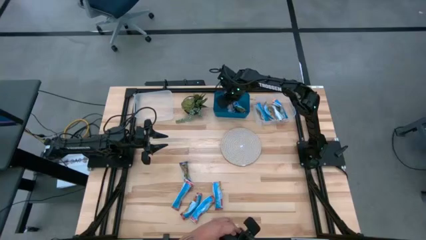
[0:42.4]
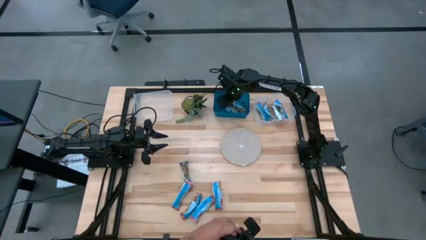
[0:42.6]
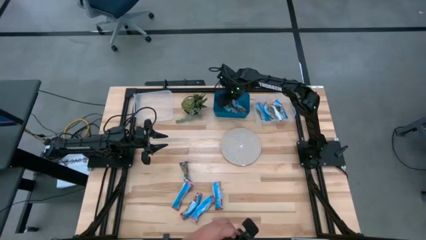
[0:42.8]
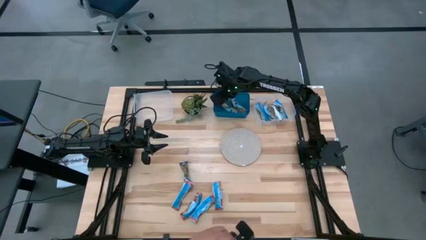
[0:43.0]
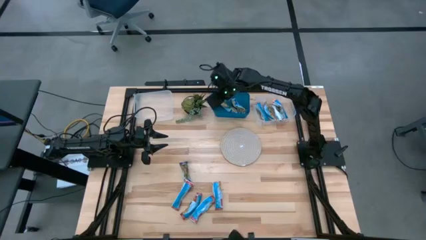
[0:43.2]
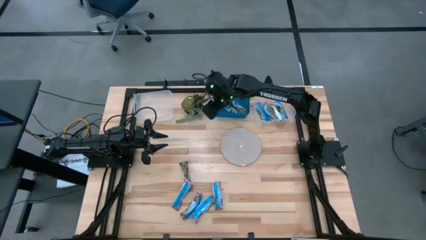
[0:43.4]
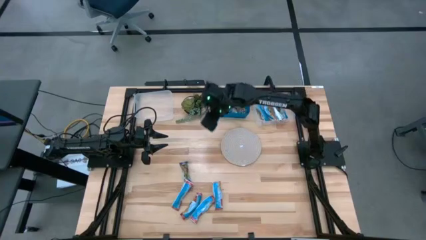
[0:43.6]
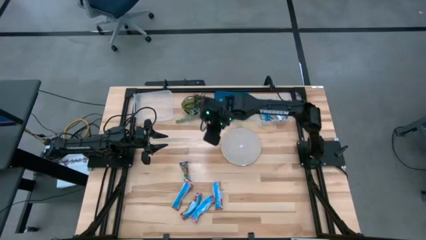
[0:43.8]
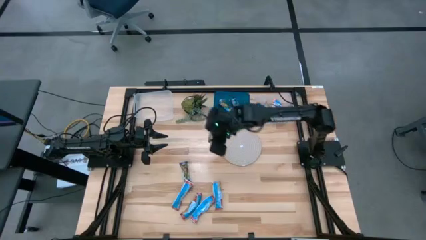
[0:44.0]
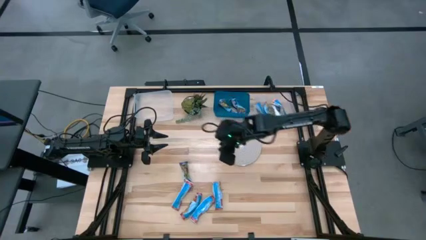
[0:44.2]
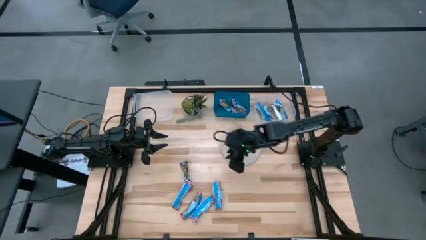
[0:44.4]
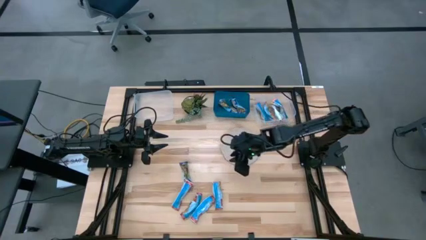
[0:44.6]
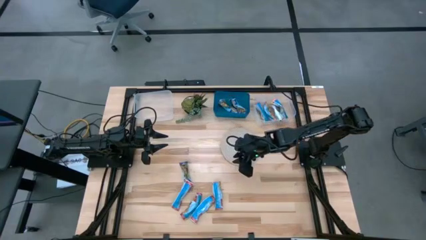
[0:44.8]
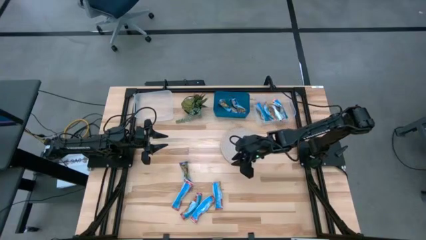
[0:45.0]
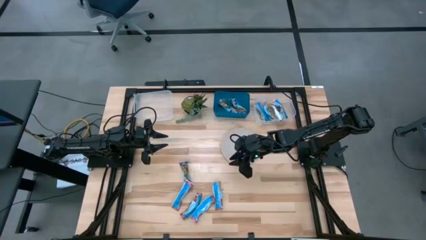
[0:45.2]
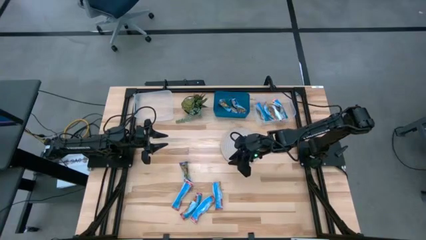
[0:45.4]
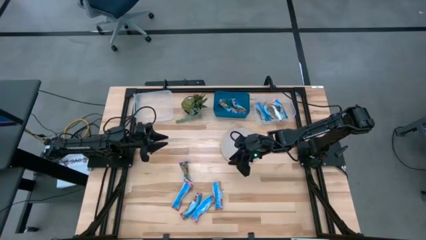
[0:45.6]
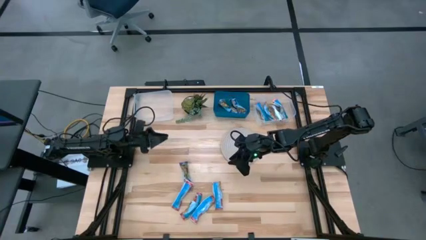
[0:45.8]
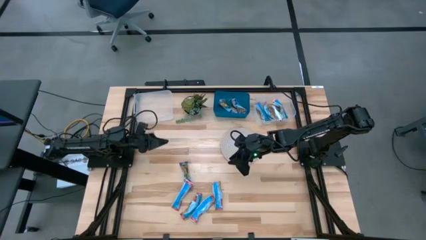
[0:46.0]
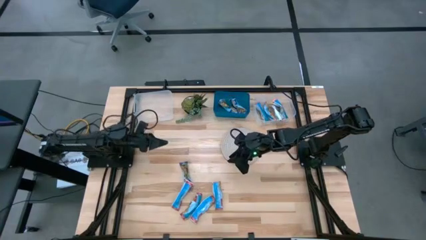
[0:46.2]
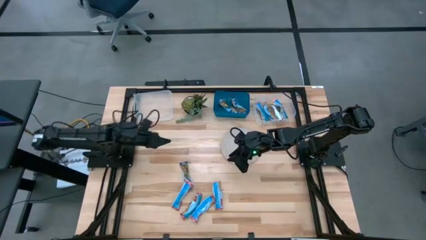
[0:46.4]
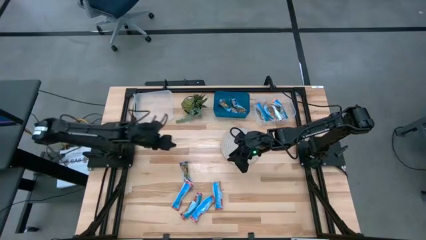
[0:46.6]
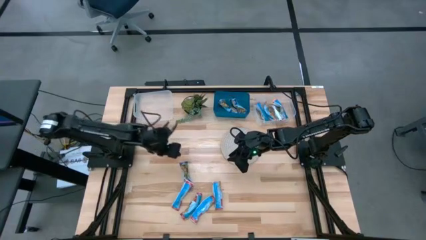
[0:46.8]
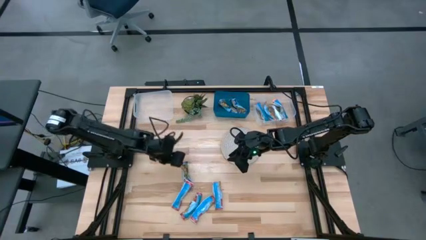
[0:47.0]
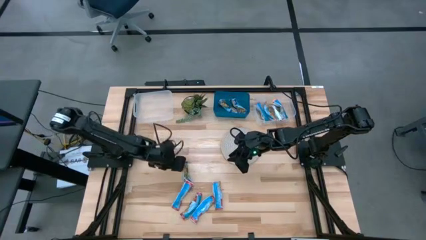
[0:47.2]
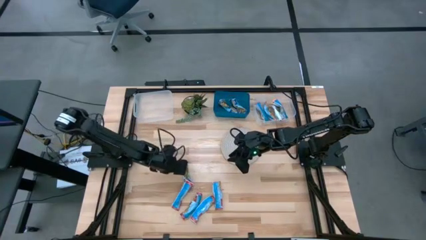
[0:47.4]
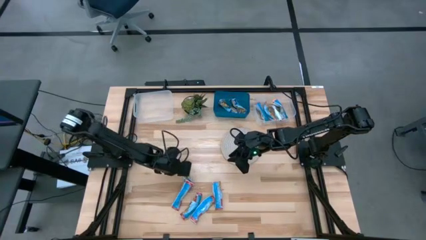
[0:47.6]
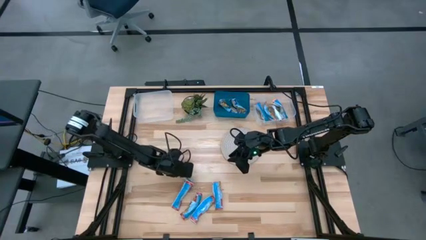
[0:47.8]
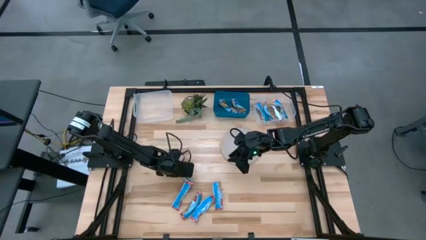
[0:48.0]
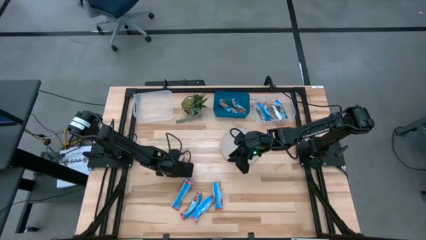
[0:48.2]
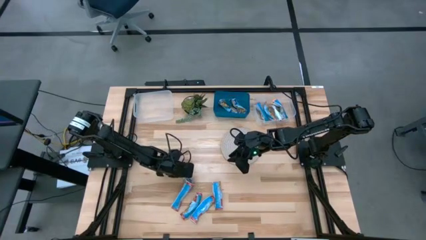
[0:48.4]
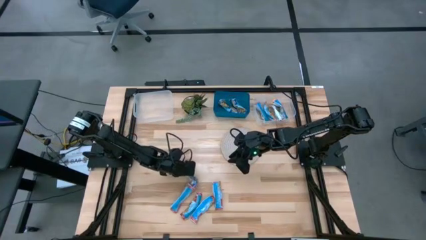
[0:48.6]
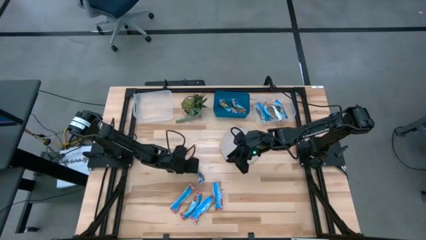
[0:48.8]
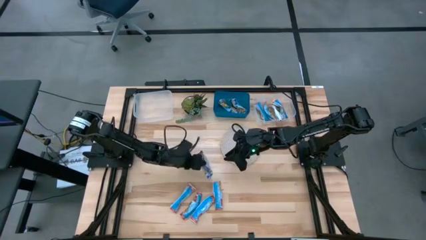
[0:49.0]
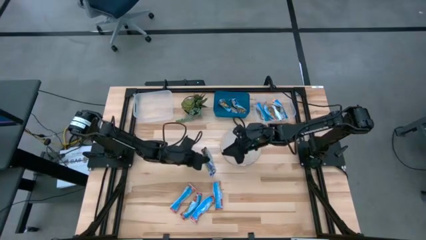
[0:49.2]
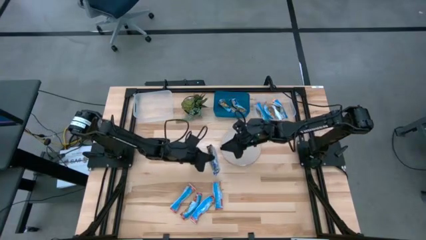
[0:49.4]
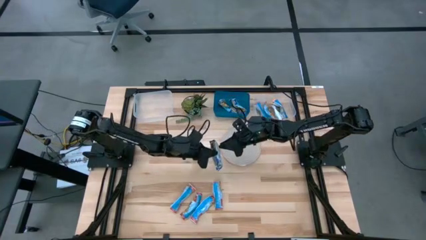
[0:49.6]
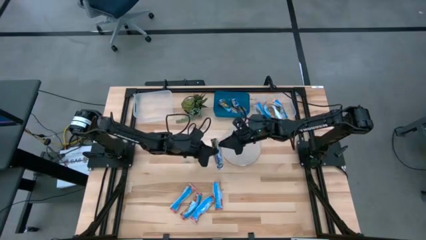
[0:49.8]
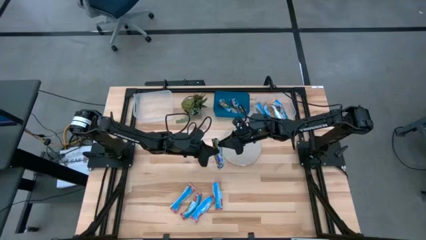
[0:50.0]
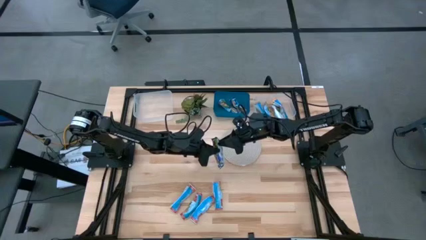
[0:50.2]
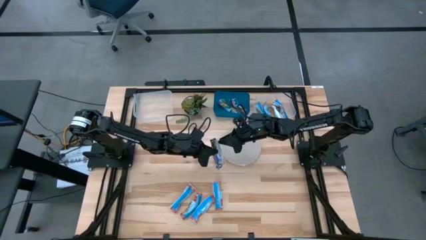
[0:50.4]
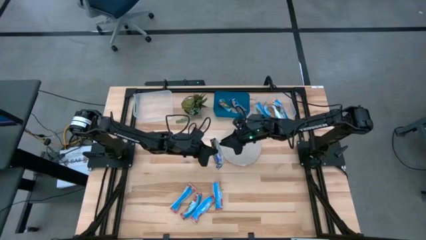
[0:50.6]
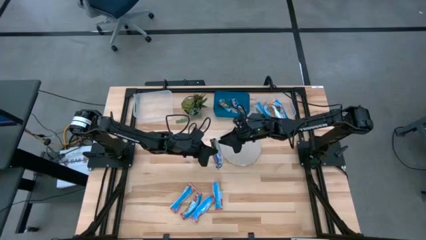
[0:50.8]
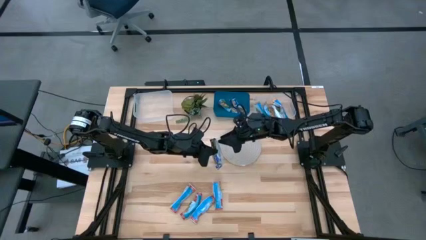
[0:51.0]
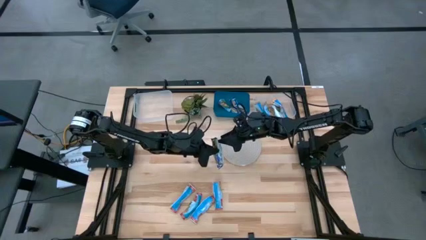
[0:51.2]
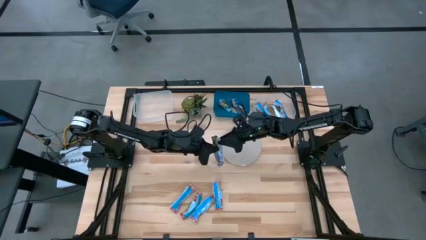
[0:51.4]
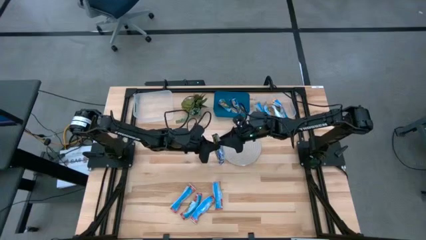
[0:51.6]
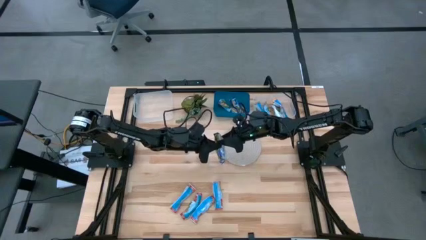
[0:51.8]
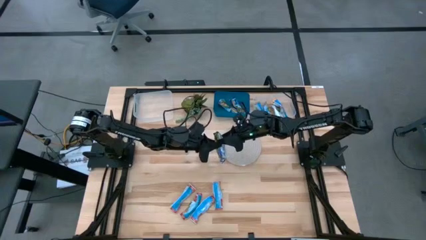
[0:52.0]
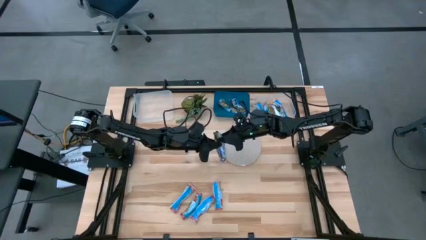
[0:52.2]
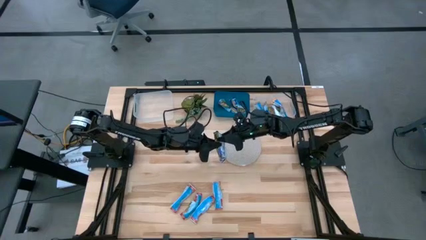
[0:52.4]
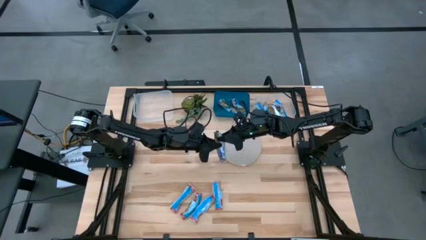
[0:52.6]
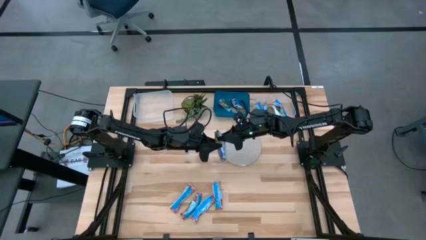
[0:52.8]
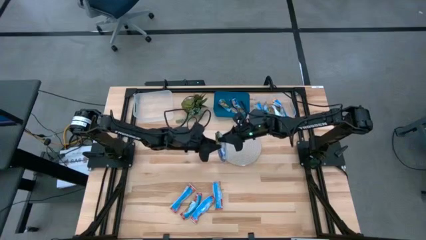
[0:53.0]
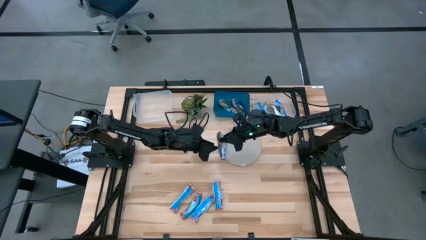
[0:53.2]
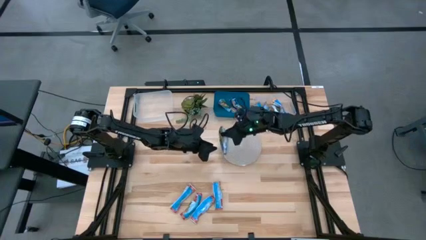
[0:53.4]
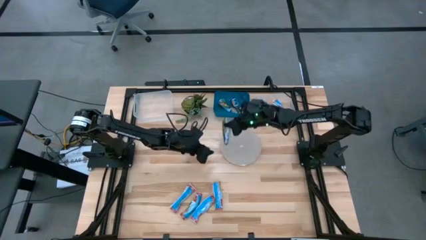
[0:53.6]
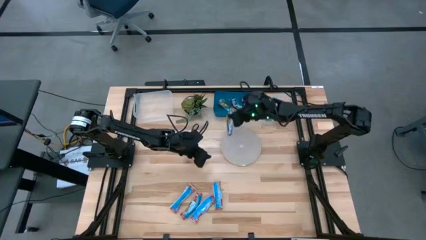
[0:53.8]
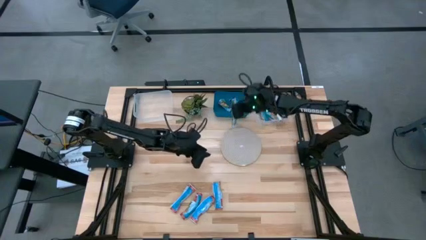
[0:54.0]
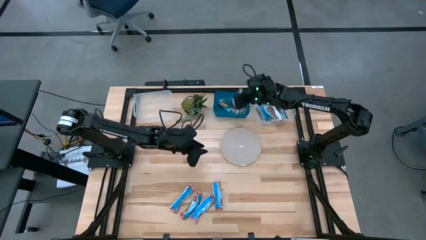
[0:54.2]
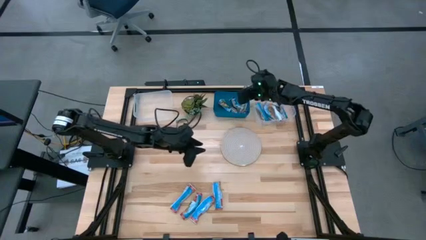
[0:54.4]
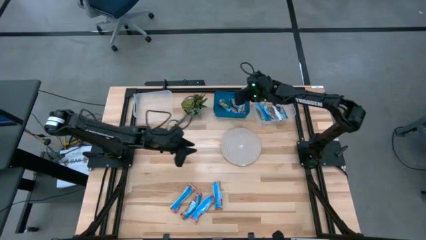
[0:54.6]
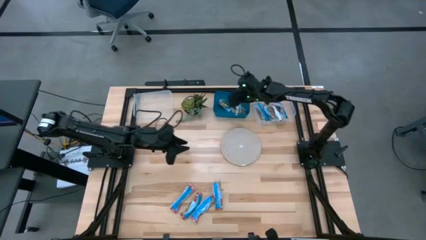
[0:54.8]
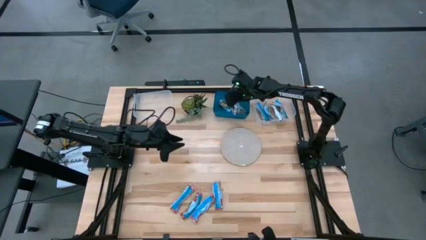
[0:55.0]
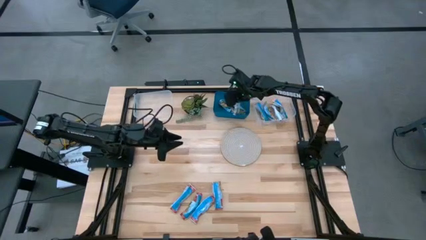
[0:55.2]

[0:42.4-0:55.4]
Task: Pick and place Granola Bars by type
Put the blue granola bar into the blue bin

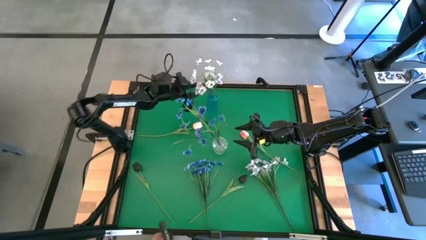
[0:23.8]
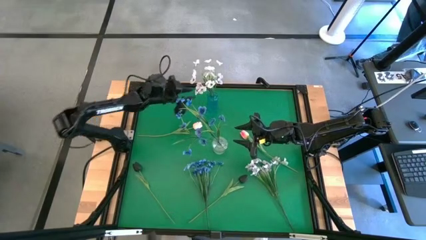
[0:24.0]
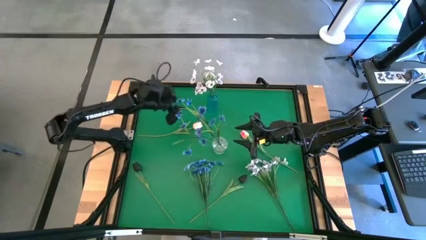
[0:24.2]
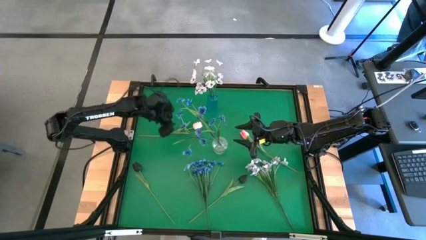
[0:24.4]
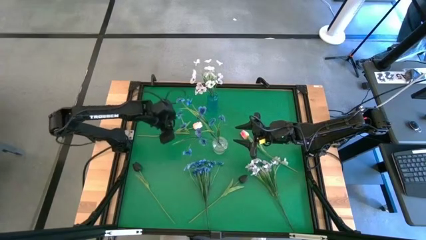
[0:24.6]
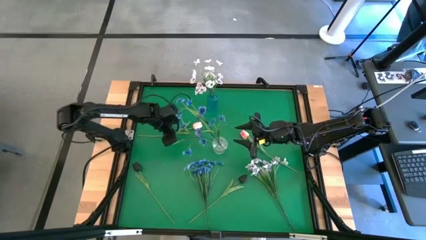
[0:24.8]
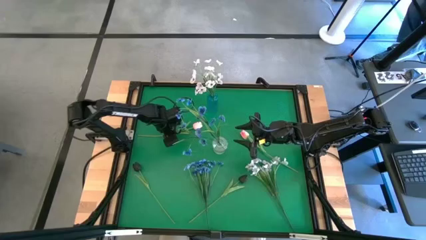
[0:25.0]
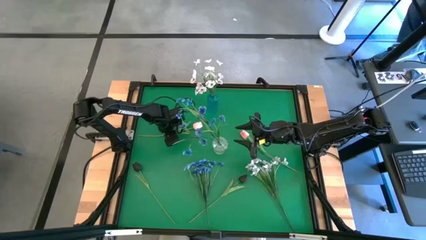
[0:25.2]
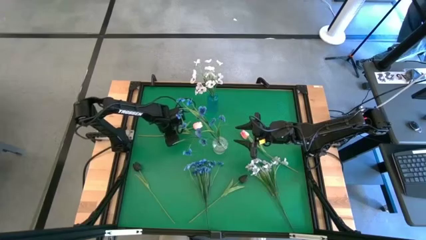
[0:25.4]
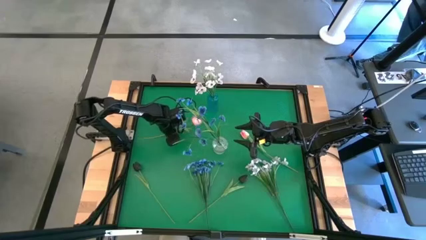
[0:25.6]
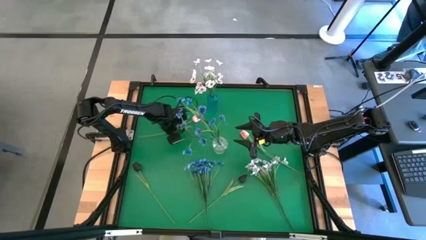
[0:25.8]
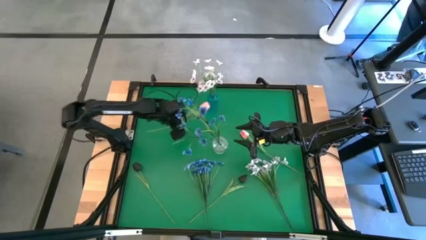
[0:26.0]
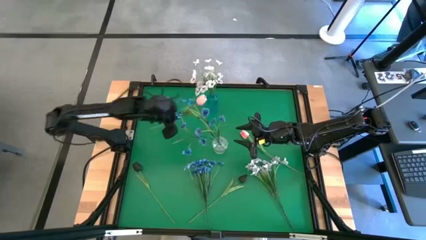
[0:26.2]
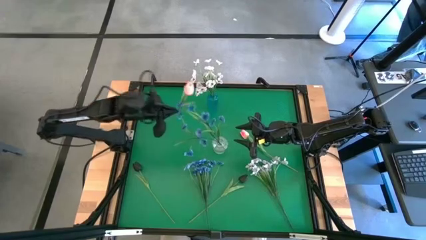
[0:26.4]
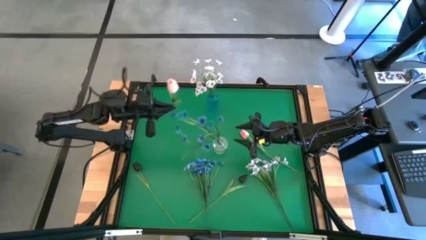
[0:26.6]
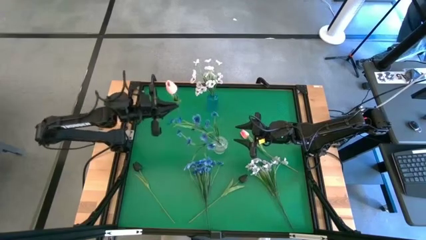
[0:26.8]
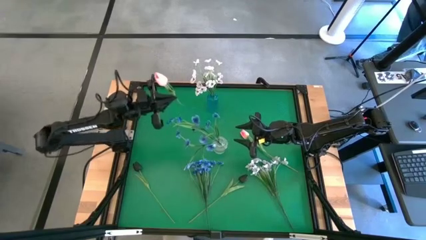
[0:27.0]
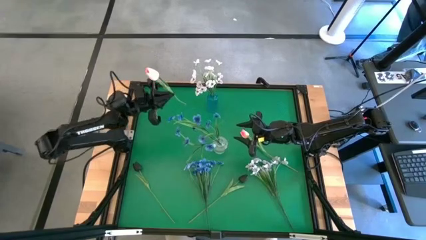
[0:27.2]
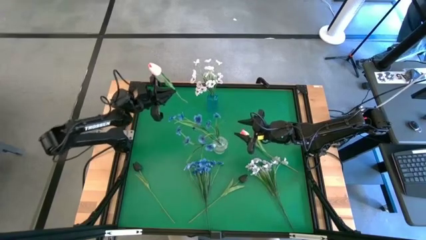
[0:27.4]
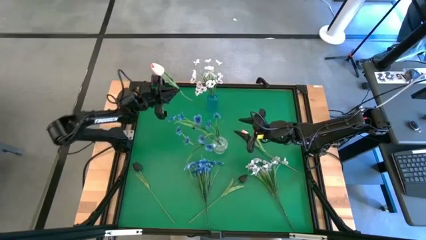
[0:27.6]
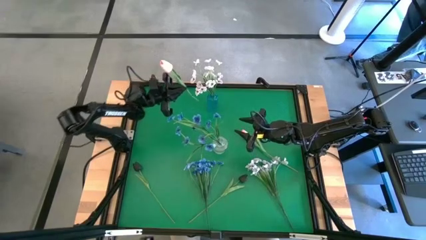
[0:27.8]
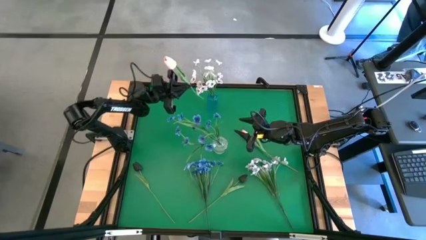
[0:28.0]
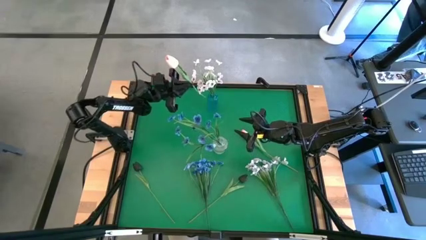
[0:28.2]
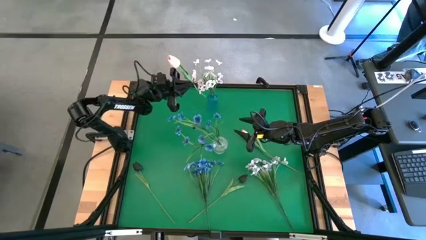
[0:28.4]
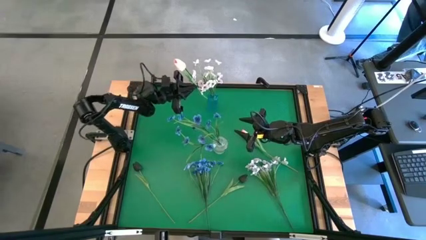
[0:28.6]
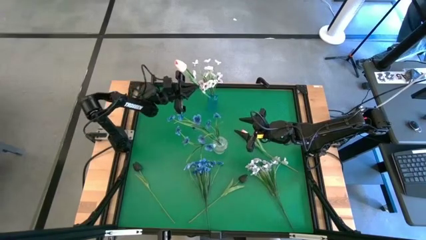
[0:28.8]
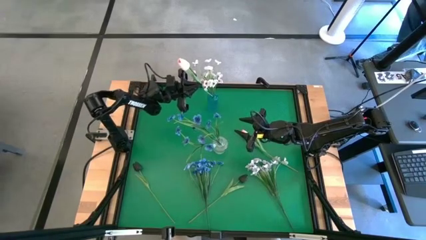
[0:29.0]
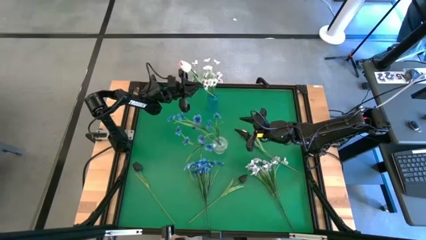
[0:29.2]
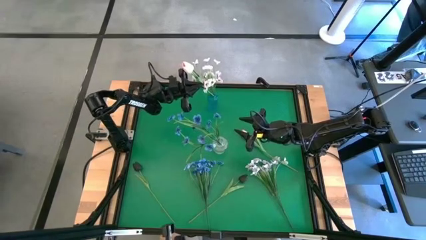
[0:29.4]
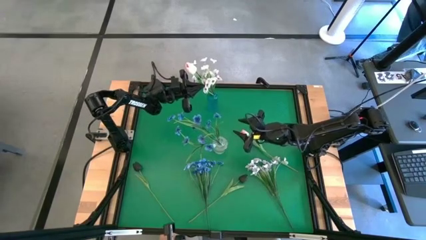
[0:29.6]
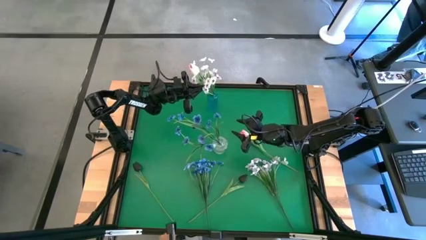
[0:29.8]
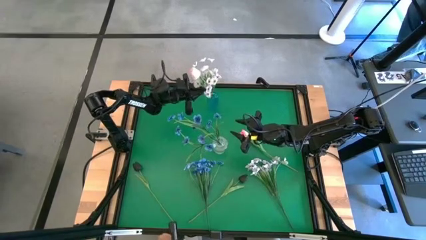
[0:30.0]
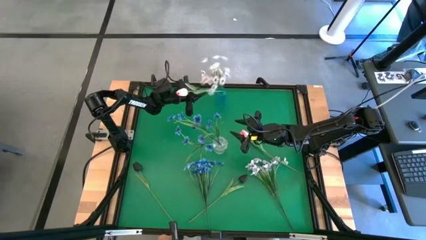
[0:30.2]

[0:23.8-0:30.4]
Task: Sort flowers into vase by color
Put the left light pink flowers into the blue transparent vase
